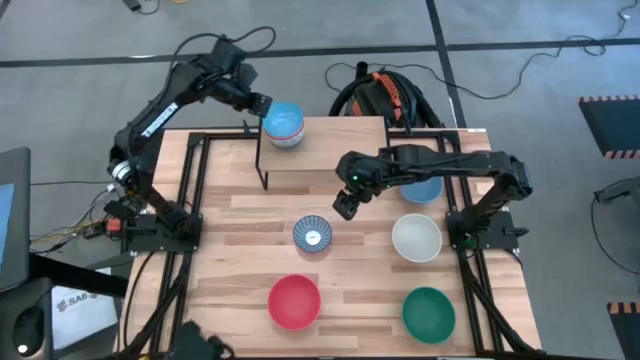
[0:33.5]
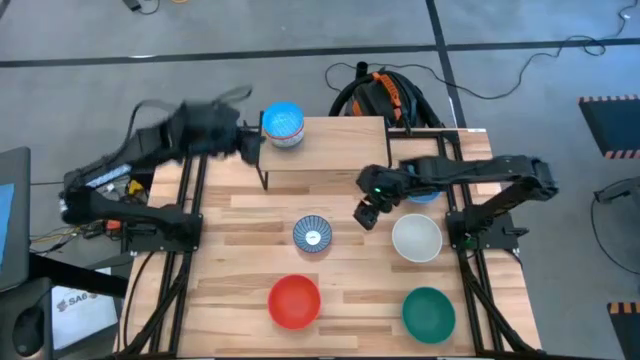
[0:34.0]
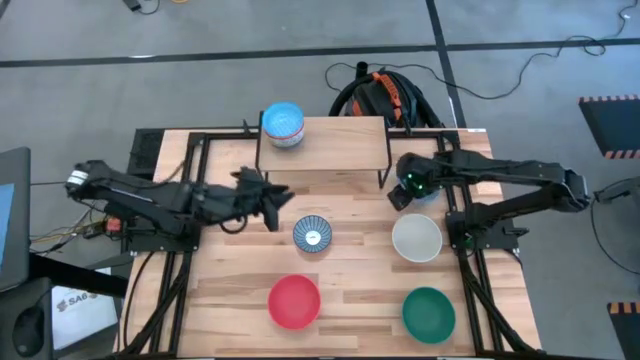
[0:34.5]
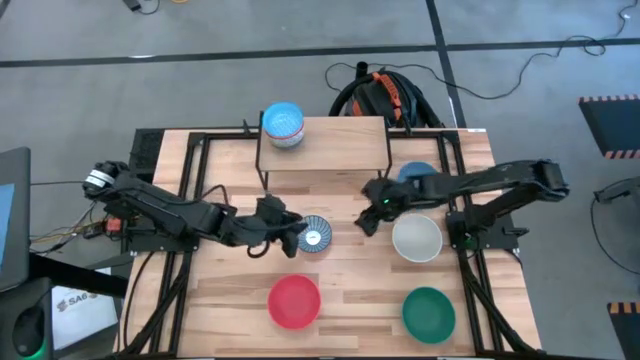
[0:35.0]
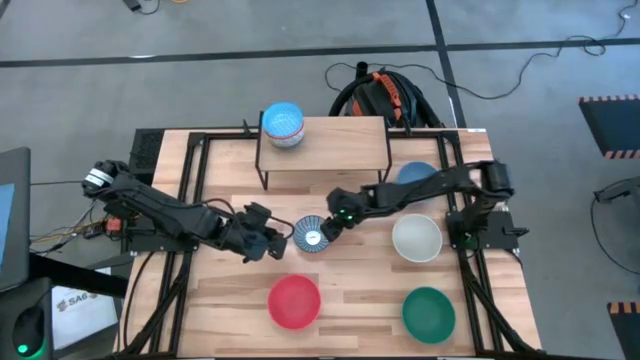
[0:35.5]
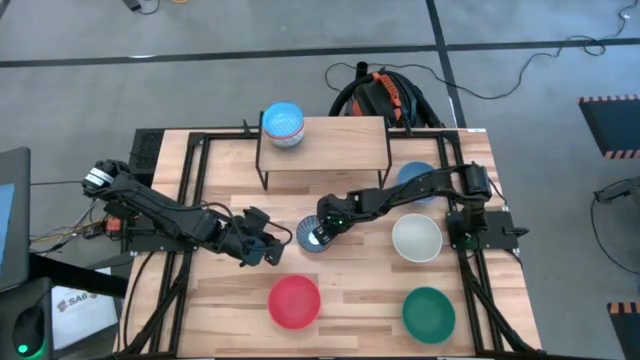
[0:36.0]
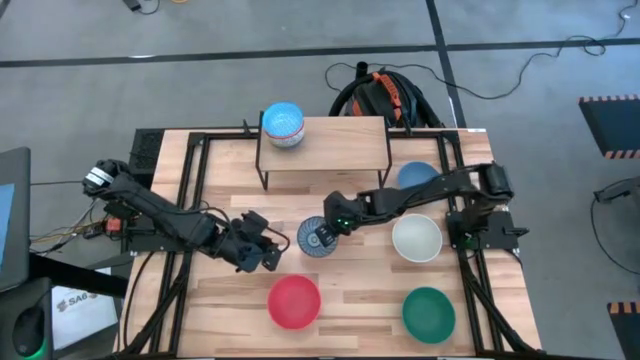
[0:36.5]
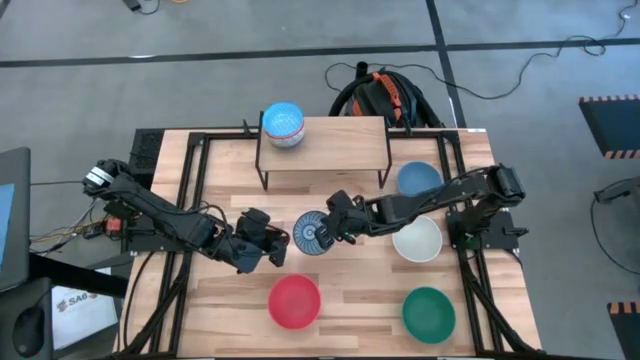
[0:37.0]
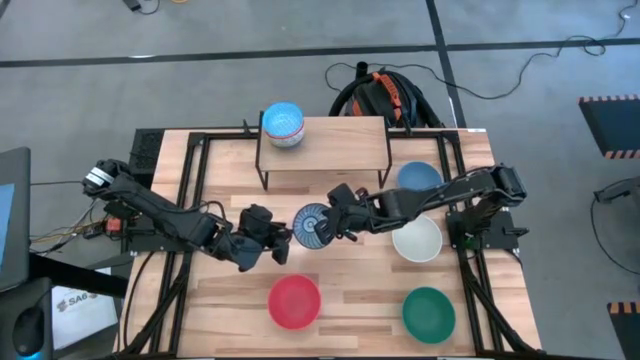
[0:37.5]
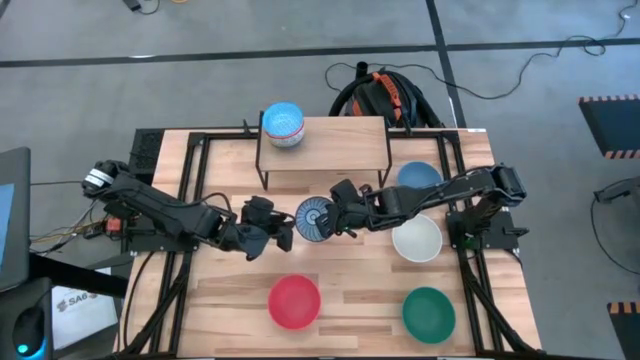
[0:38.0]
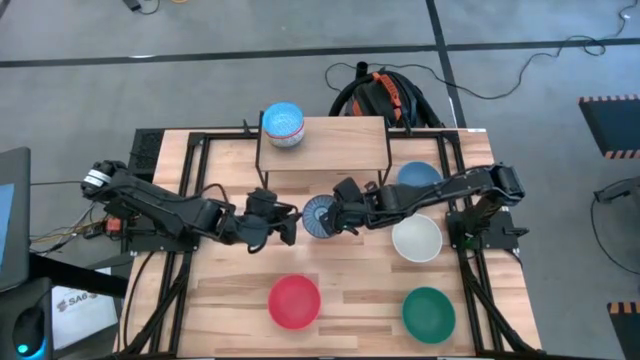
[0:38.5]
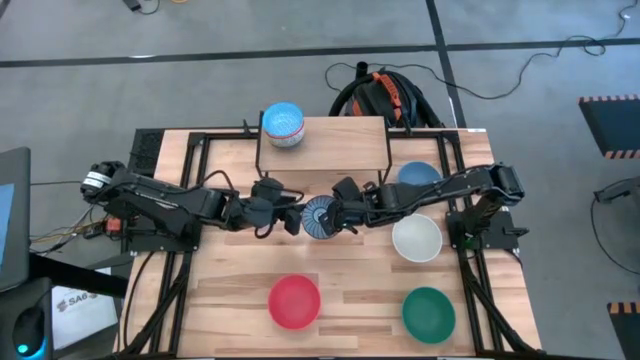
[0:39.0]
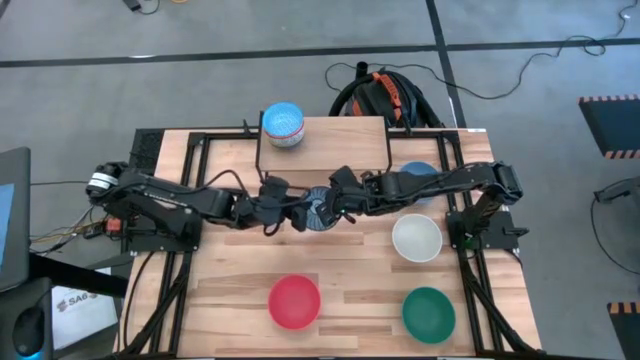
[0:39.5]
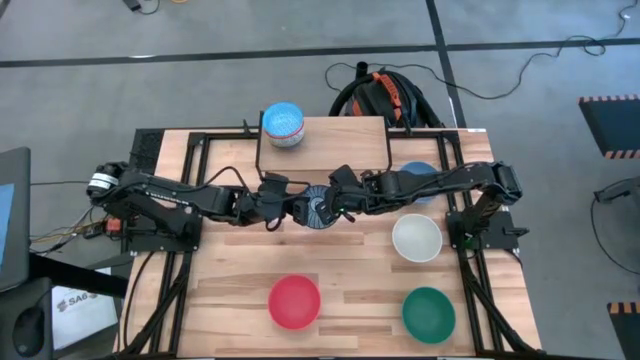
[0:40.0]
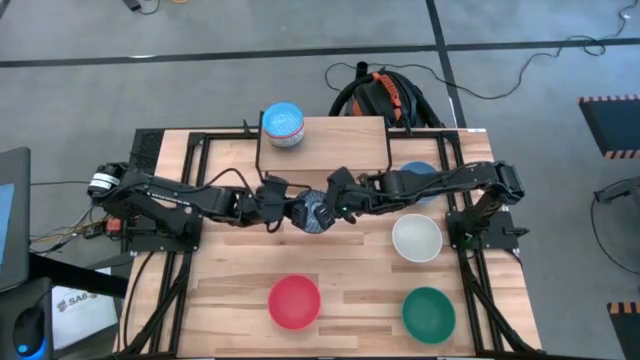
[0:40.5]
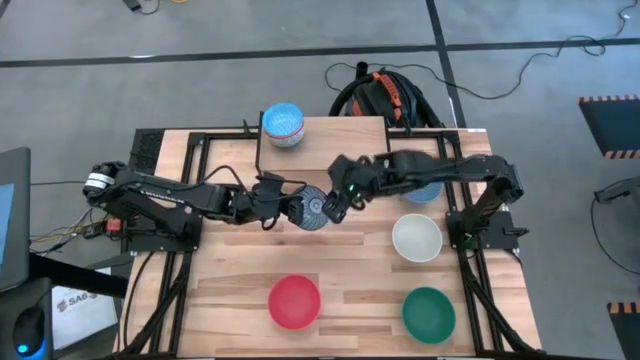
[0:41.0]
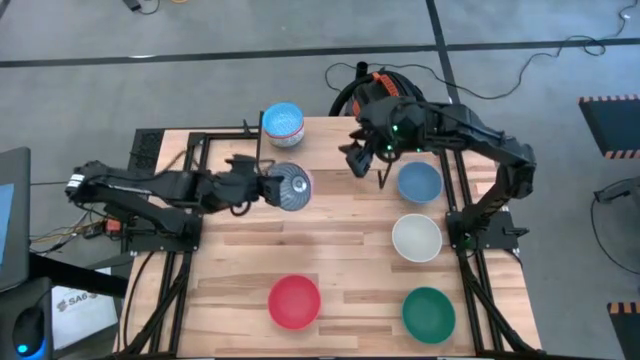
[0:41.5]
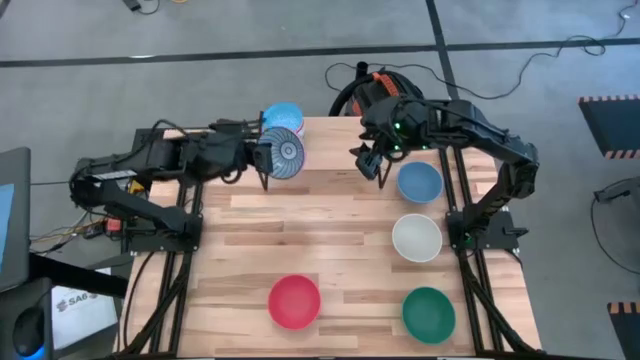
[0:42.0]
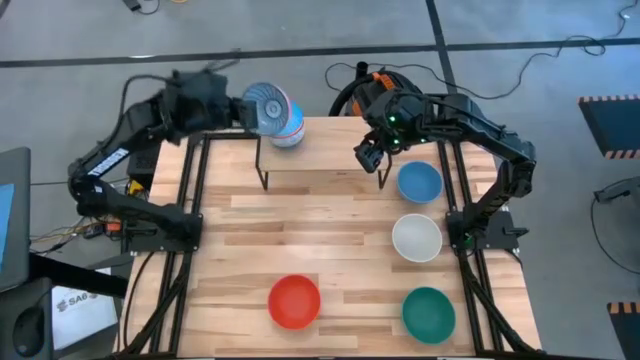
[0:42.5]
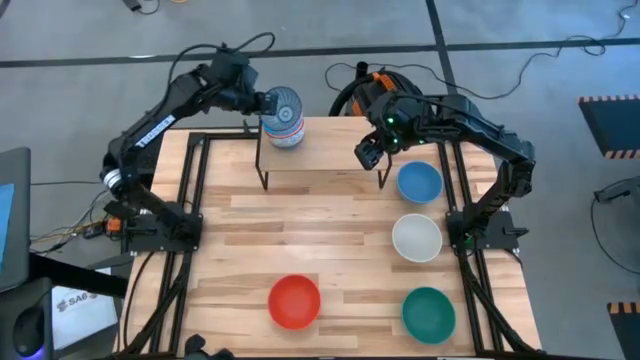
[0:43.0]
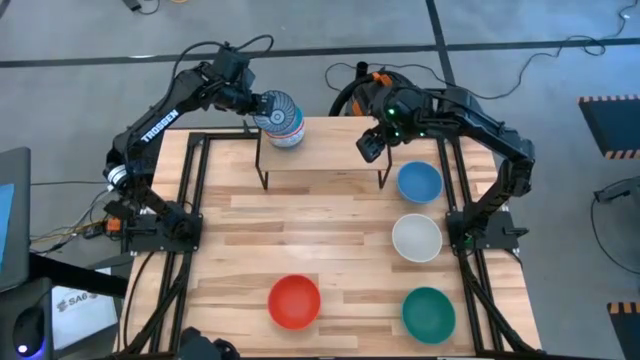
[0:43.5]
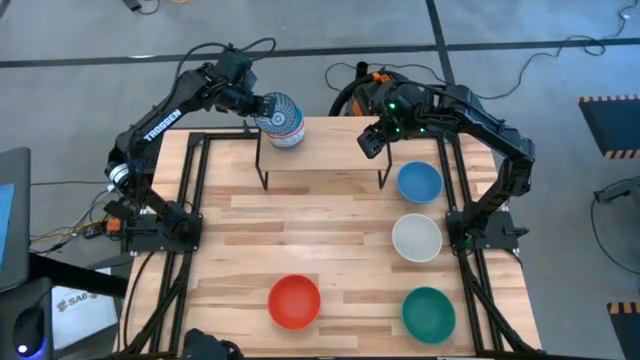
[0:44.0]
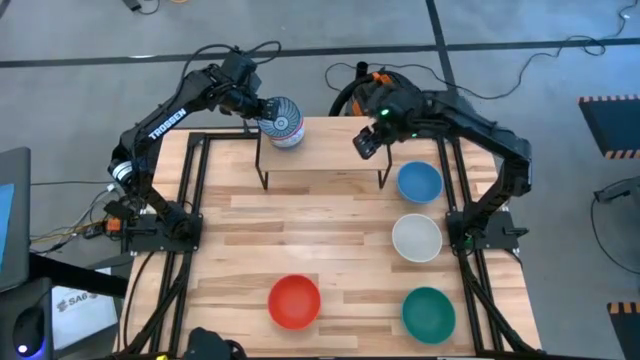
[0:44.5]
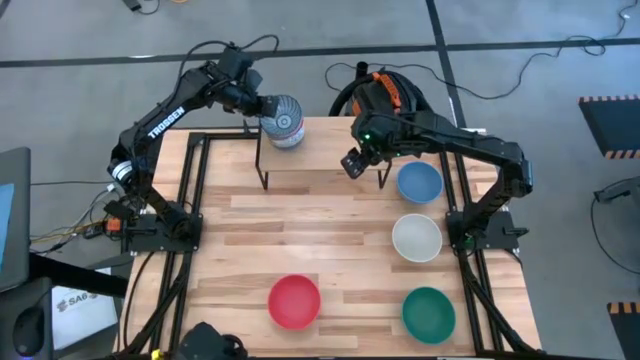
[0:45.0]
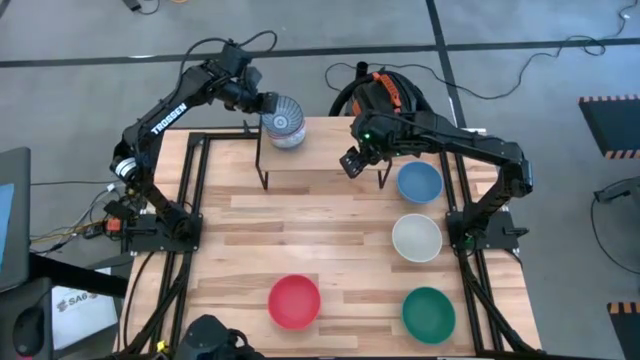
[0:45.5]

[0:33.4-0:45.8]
Task: Place and stack bowls onto a shelf
Stack the blue pattern bowl on top of the light blue pattern bowl on the shelf

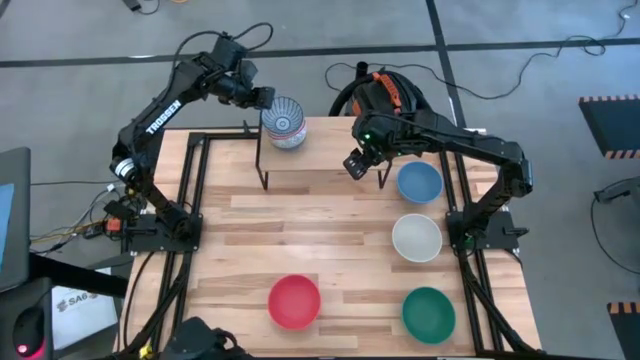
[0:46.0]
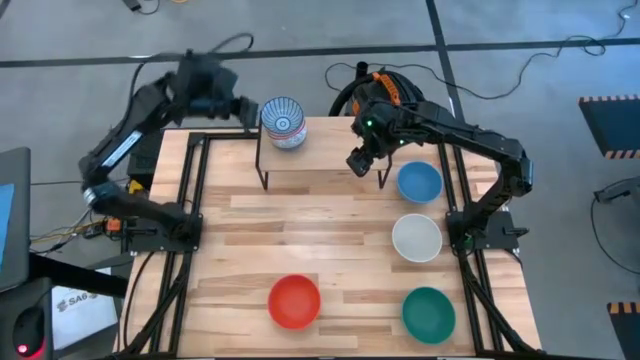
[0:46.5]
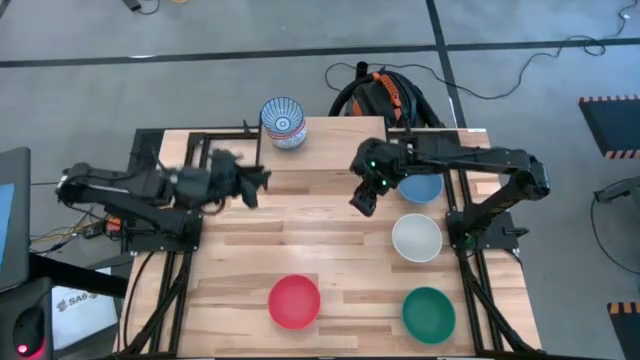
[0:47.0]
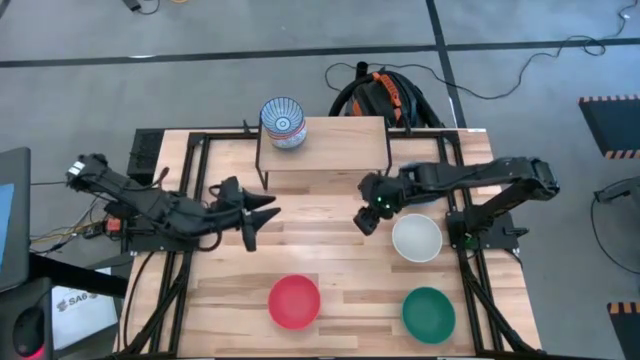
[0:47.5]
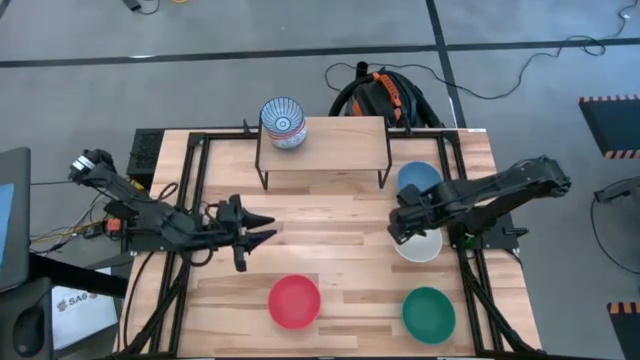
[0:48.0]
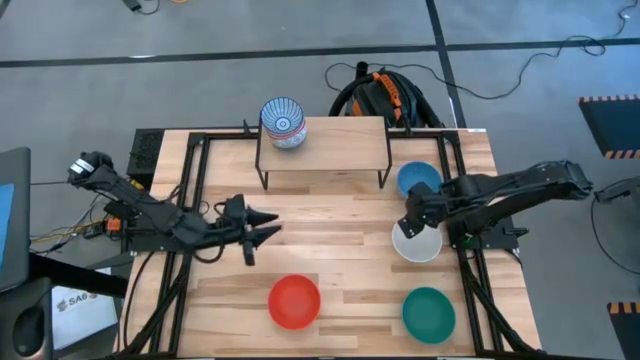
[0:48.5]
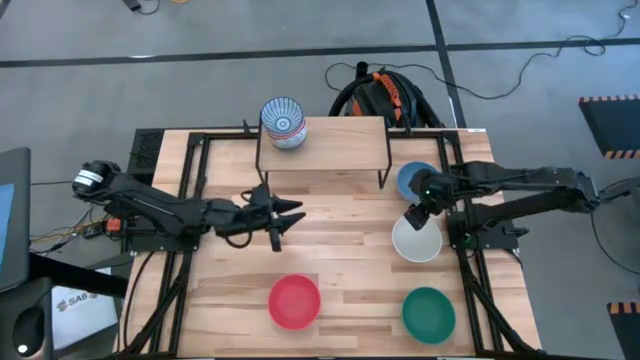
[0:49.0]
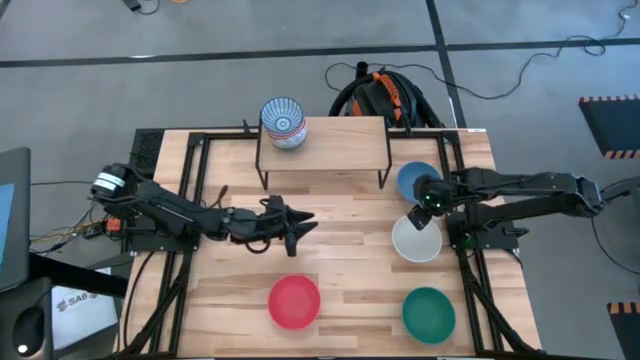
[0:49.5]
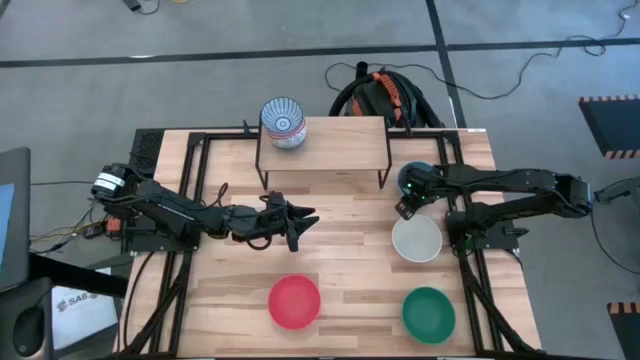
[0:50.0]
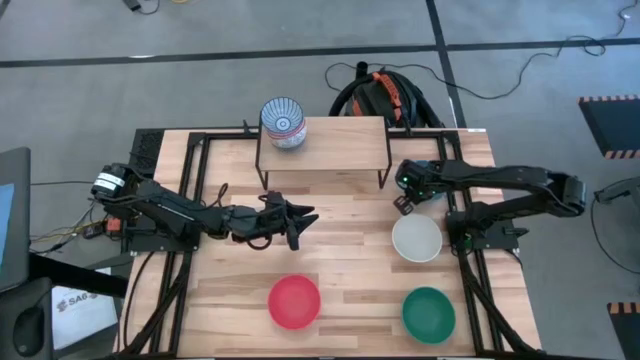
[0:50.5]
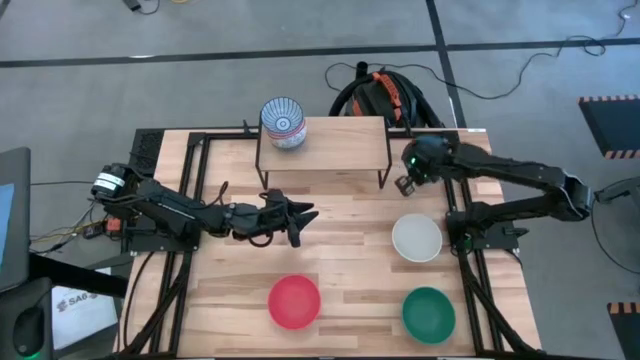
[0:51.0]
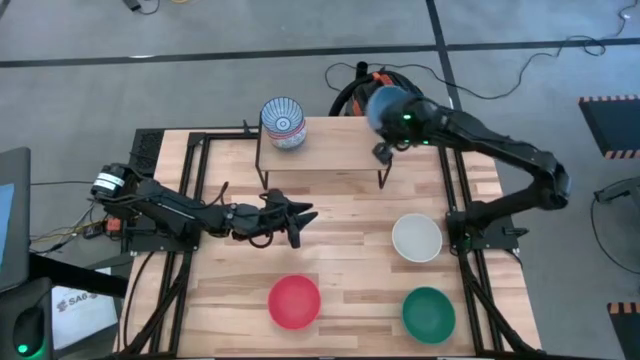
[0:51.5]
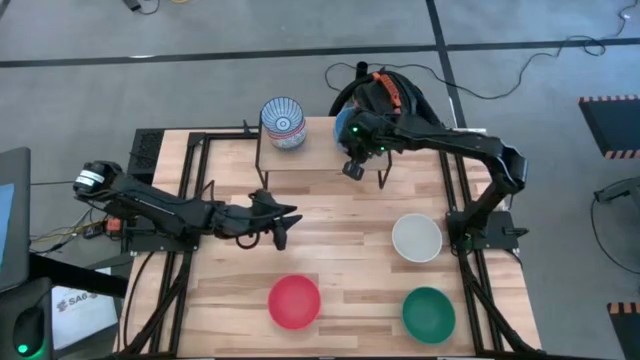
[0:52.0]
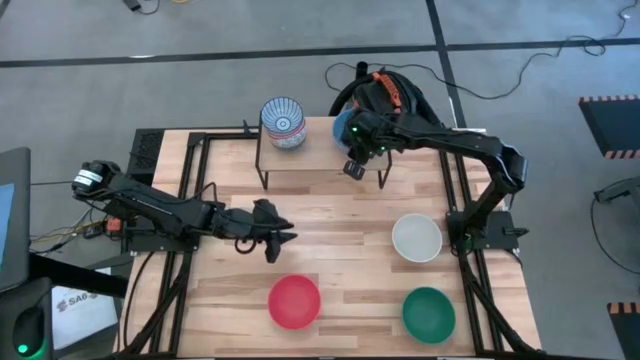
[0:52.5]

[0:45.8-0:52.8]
Put the blue bowl on the shelf

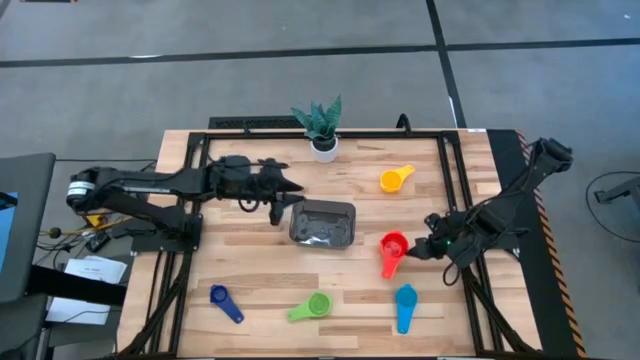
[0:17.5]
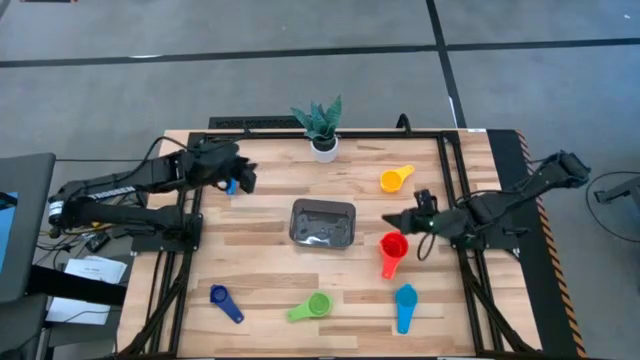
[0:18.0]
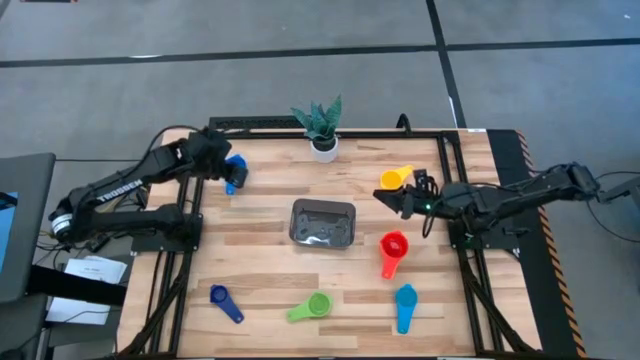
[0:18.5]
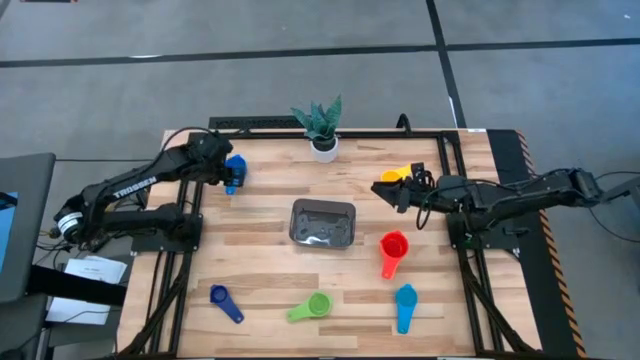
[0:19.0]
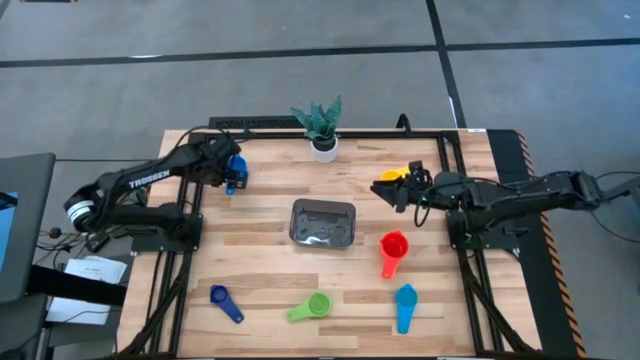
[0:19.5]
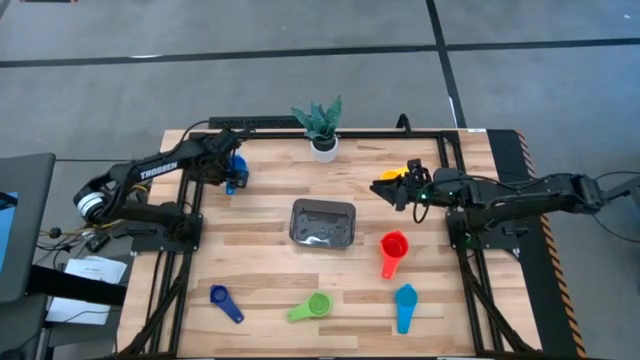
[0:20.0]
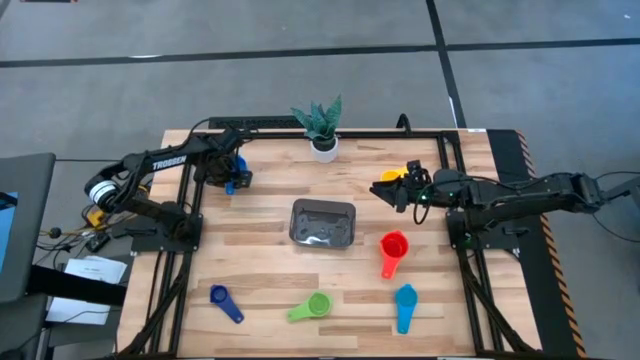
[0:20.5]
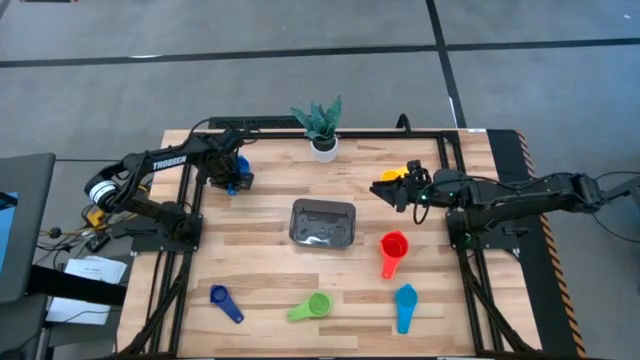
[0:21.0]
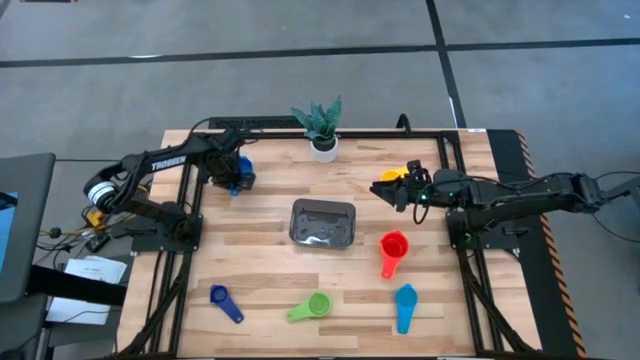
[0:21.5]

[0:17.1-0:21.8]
Task: Nest measuring cups in basket
Stack the blue measuring cup on top of the red measuring cup
